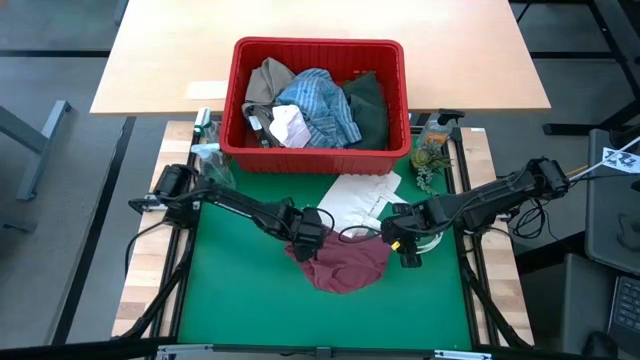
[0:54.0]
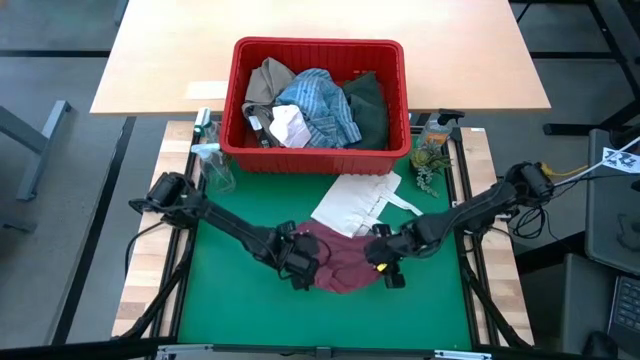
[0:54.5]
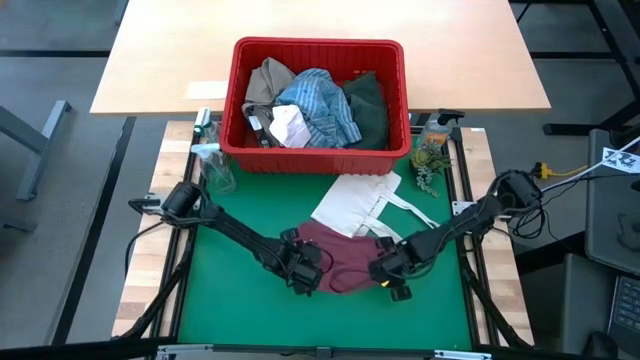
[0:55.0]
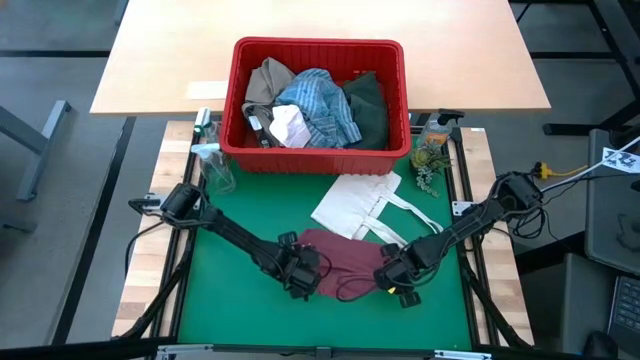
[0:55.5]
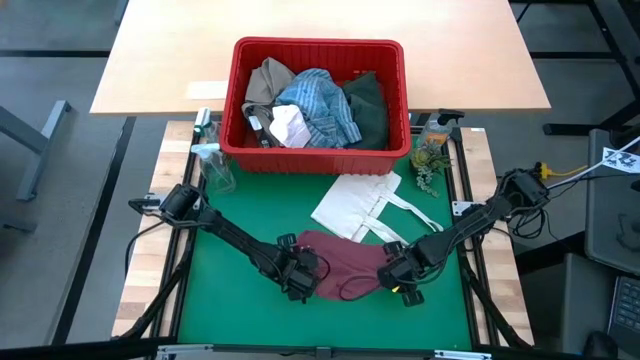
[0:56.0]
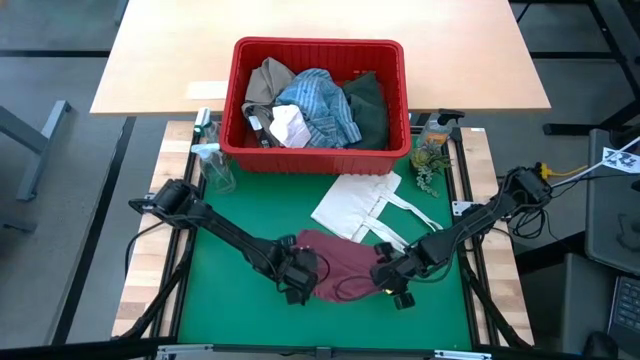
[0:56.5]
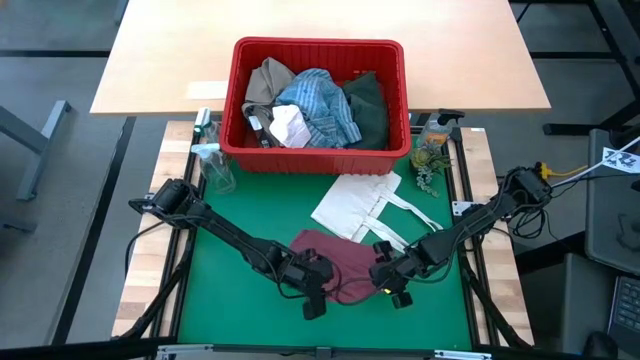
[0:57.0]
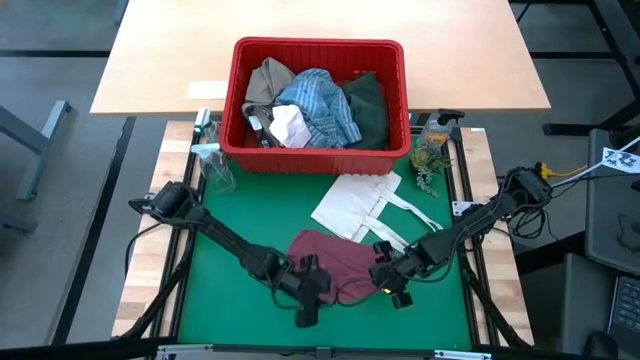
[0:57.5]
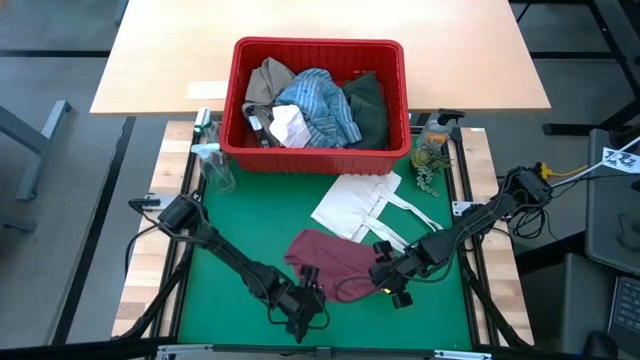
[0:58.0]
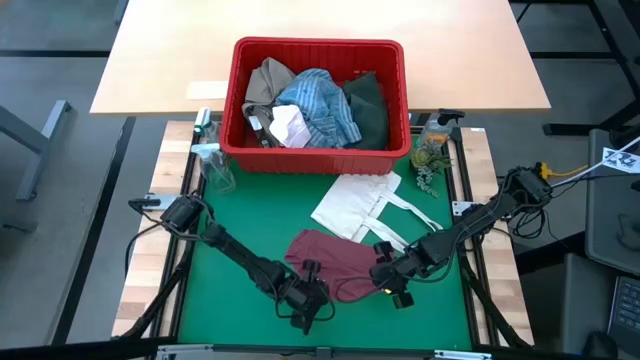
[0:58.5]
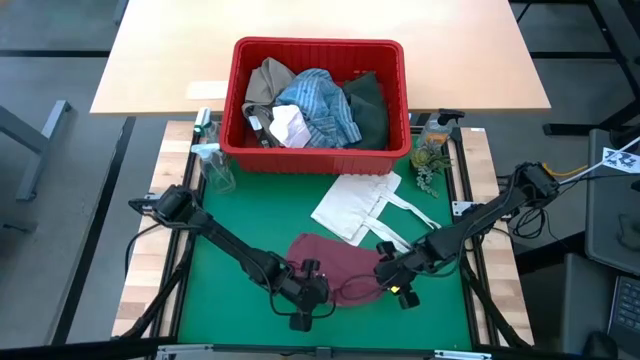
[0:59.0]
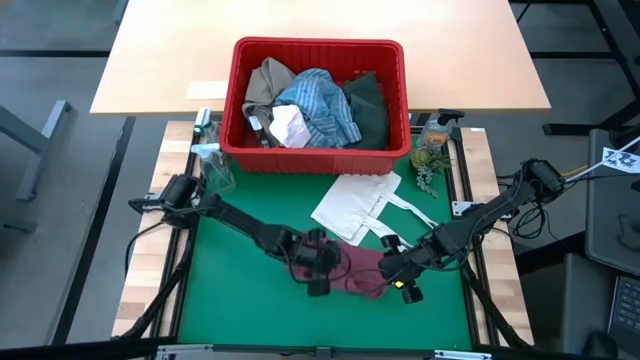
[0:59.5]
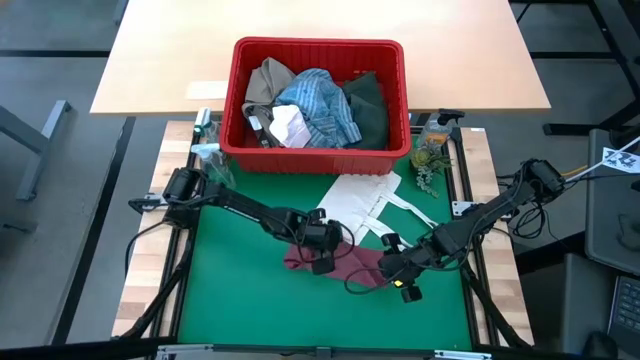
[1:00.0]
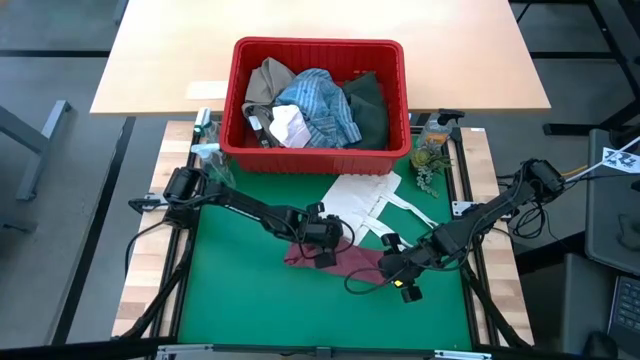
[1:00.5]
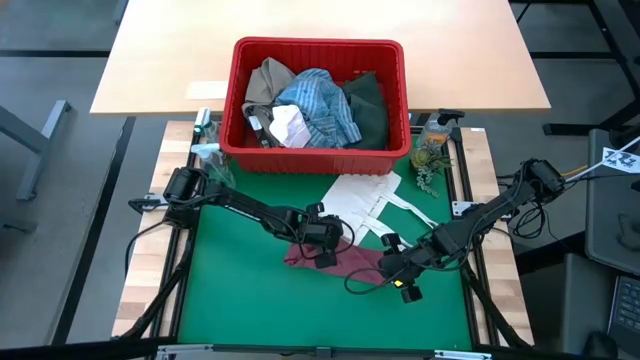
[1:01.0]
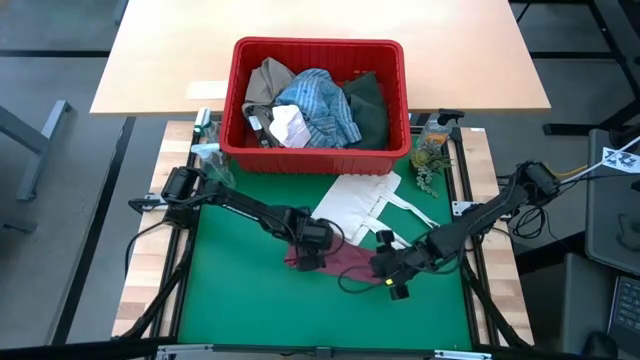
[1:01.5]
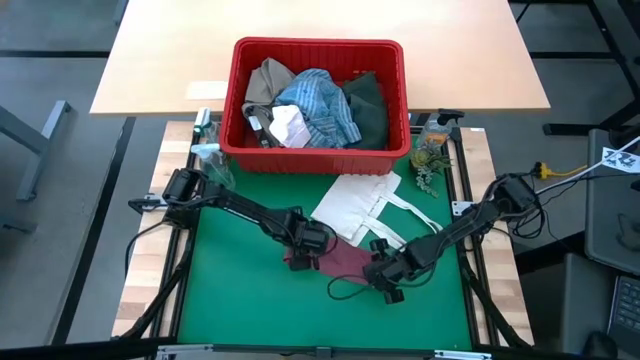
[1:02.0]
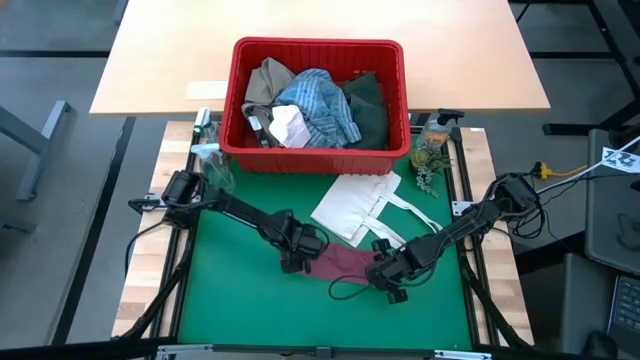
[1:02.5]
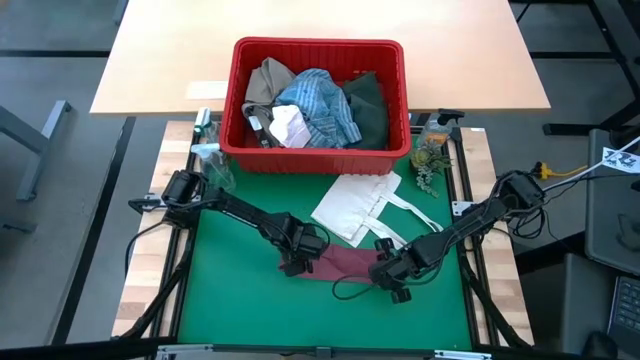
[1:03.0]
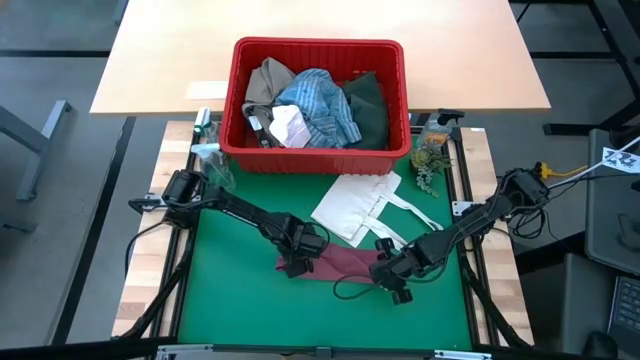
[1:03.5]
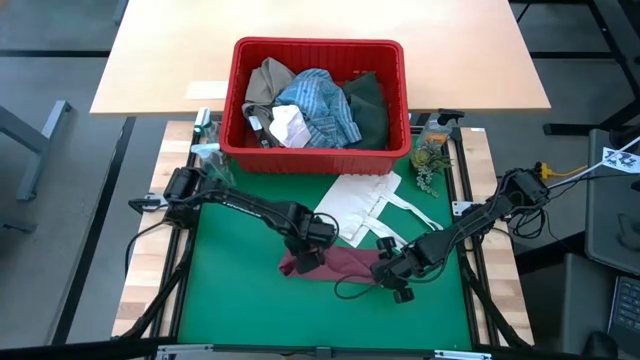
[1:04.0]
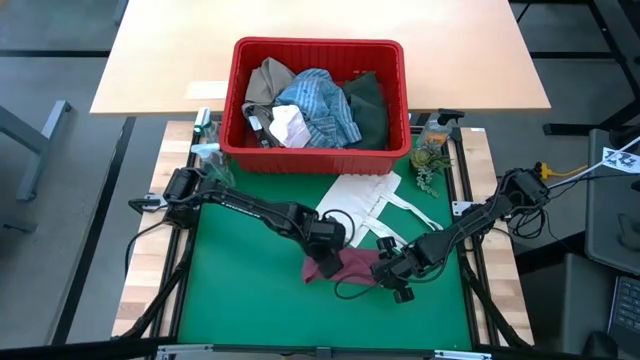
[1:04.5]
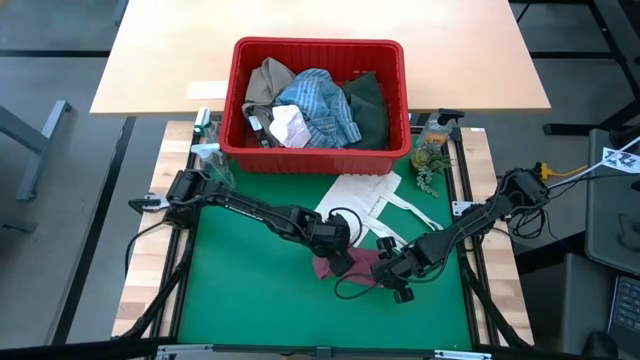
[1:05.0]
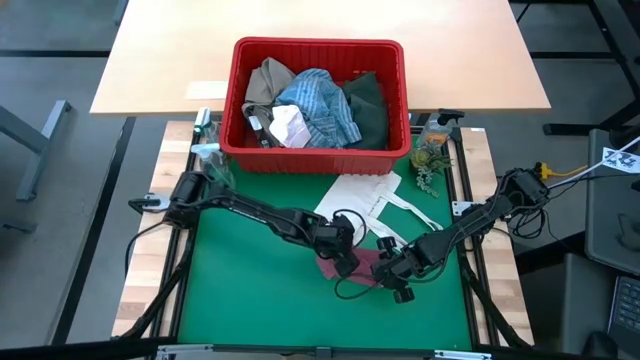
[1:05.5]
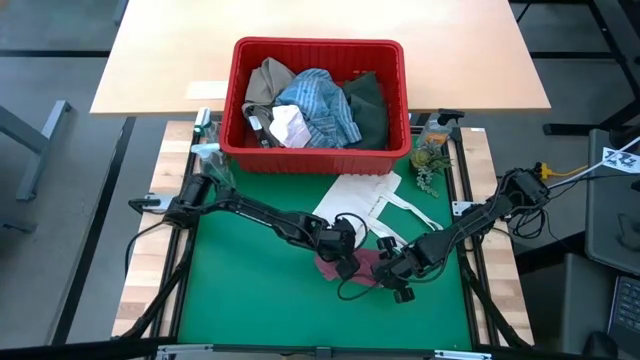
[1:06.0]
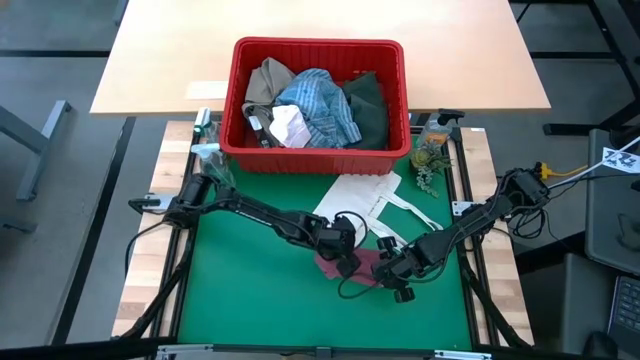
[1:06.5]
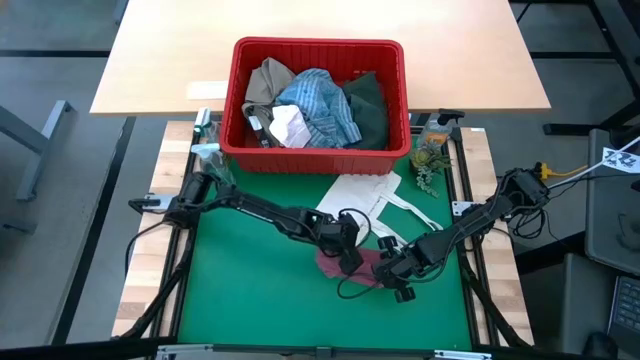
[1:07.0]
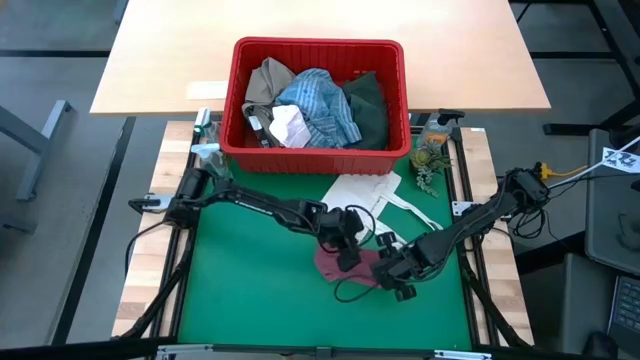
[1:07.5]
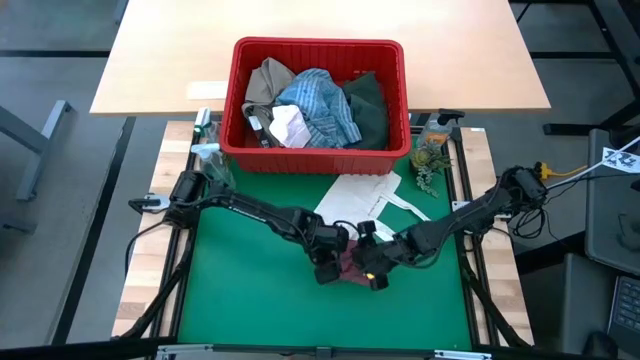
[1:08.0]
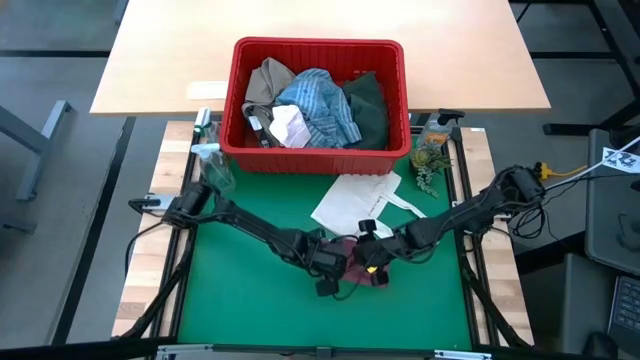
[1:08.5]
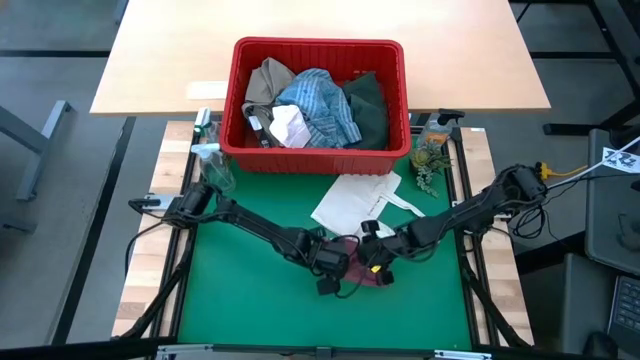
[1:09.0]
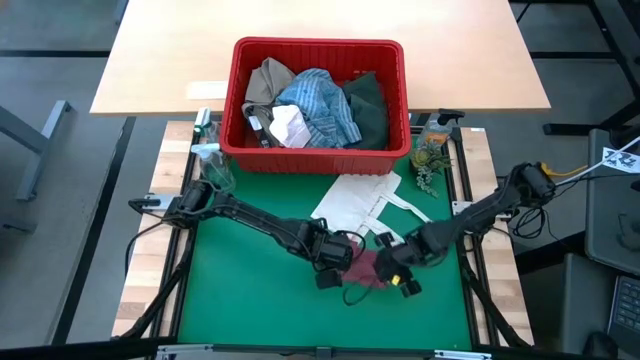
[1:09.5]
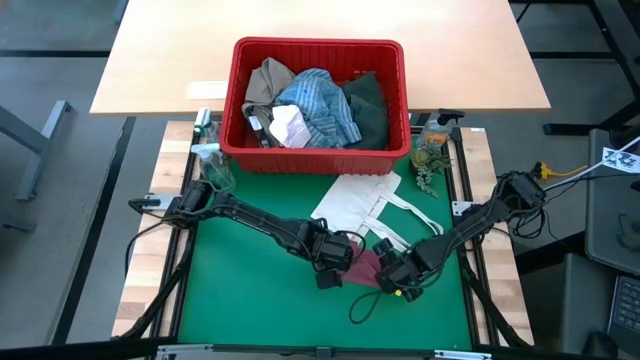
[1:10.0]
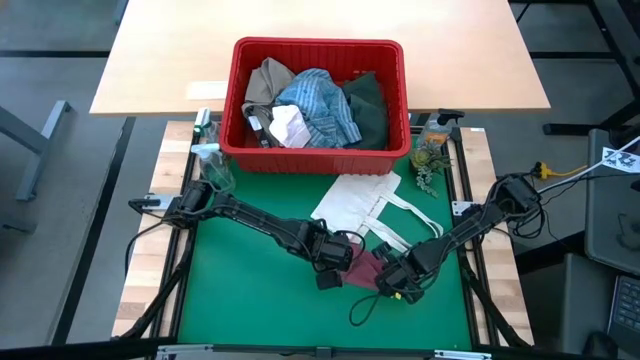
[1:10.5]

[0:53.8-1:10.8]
Task: Fold Laundry from Bin
Fold the pink underwear
